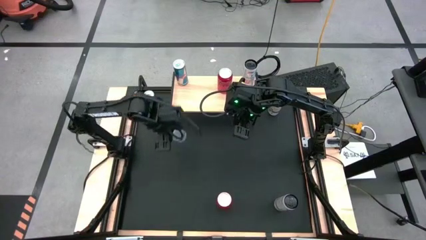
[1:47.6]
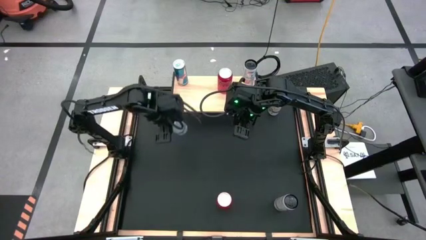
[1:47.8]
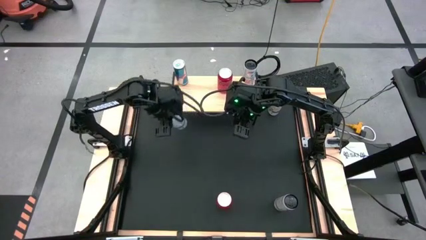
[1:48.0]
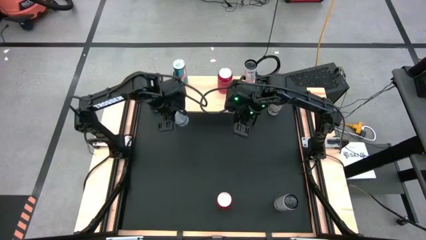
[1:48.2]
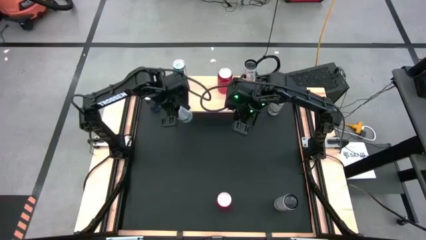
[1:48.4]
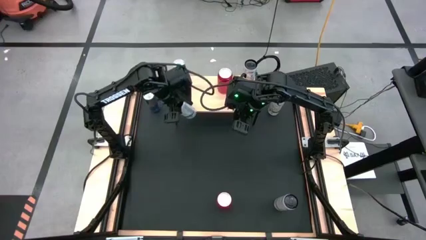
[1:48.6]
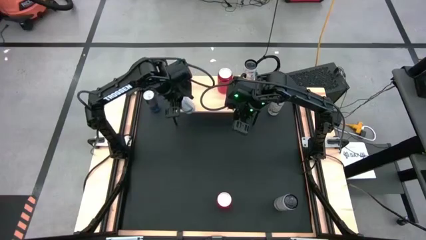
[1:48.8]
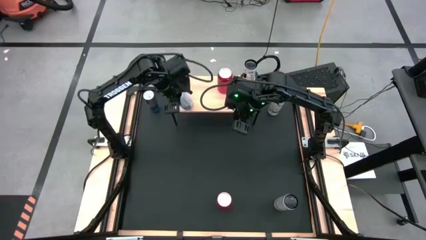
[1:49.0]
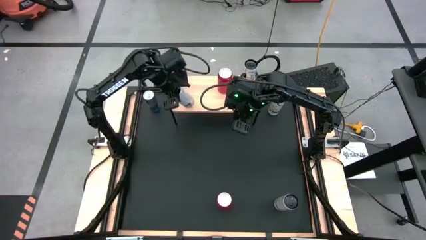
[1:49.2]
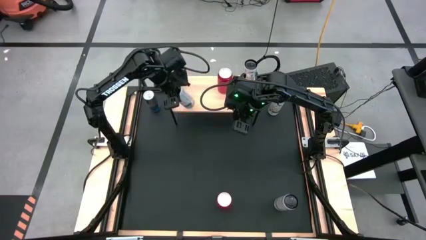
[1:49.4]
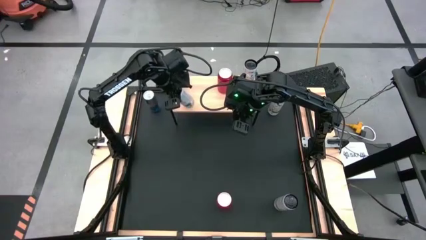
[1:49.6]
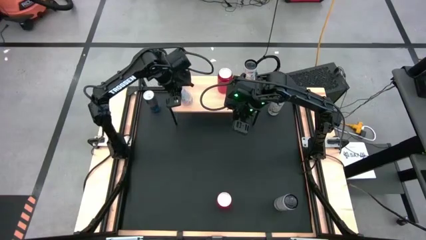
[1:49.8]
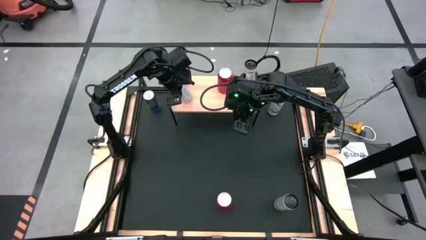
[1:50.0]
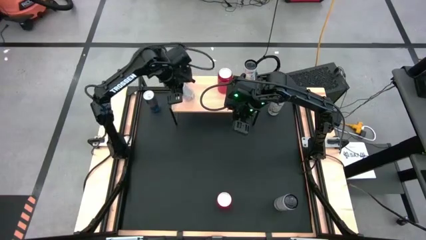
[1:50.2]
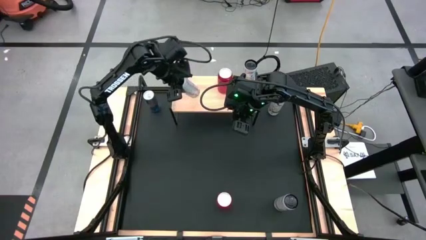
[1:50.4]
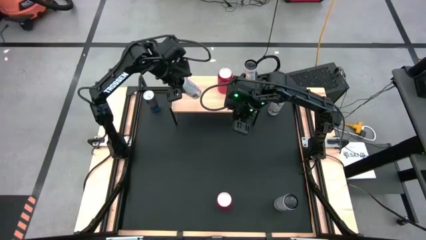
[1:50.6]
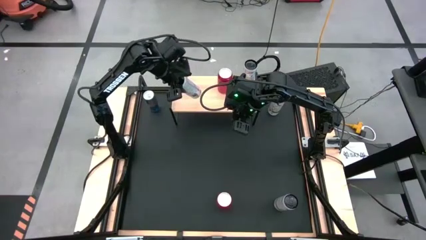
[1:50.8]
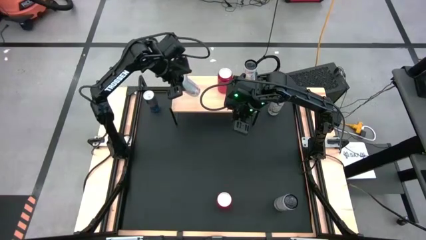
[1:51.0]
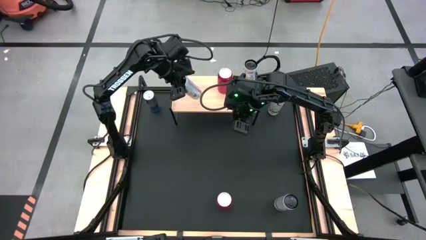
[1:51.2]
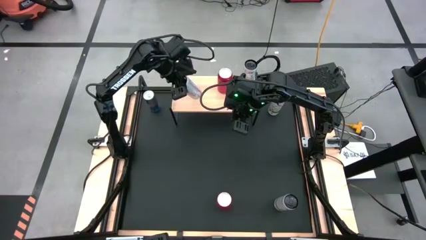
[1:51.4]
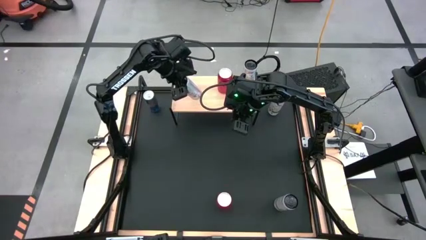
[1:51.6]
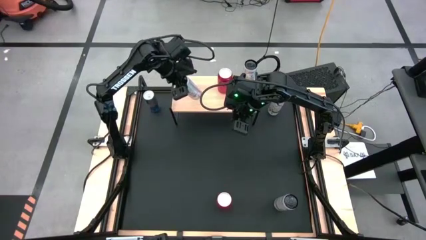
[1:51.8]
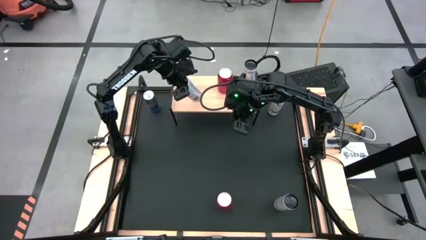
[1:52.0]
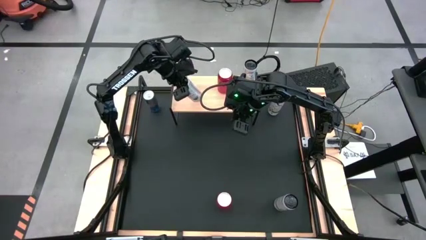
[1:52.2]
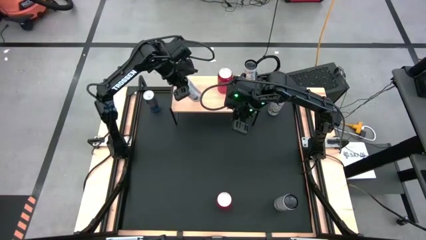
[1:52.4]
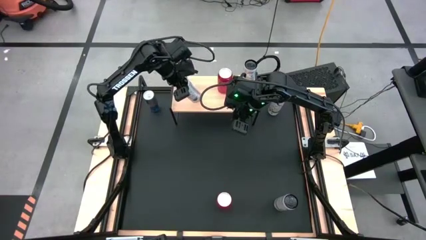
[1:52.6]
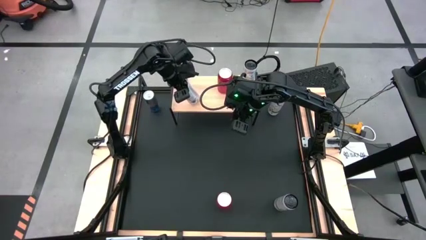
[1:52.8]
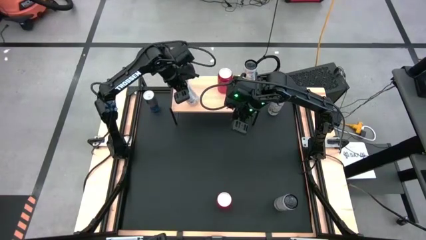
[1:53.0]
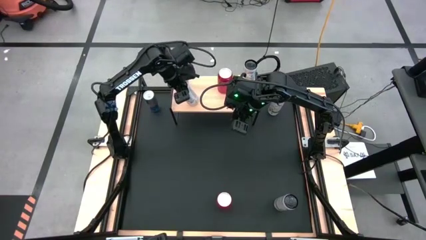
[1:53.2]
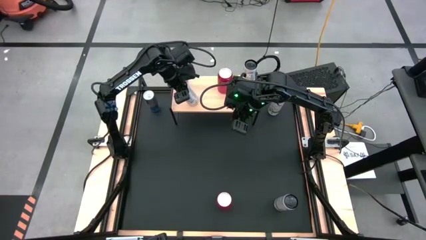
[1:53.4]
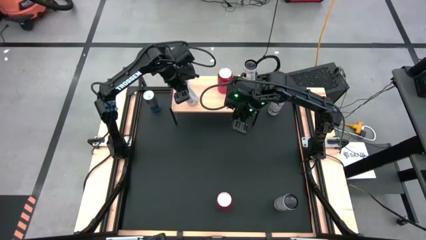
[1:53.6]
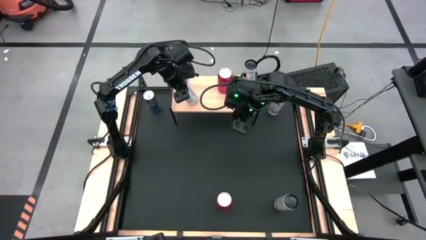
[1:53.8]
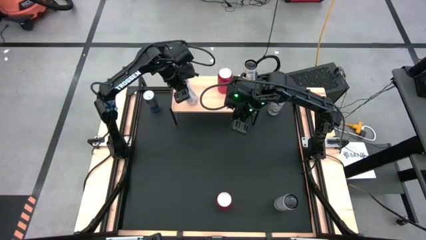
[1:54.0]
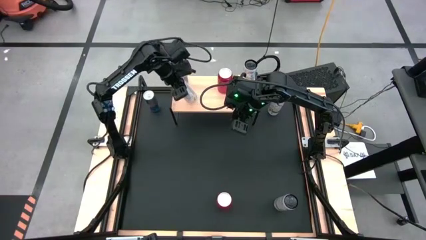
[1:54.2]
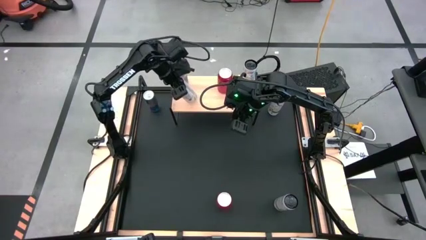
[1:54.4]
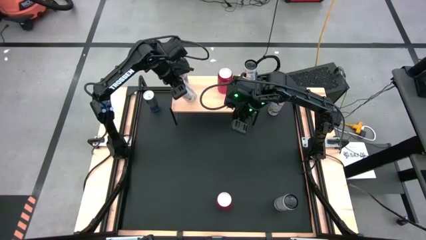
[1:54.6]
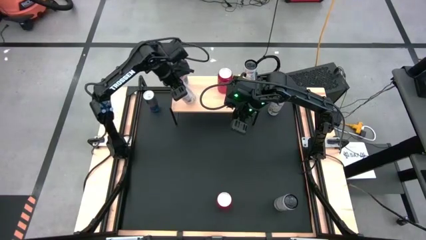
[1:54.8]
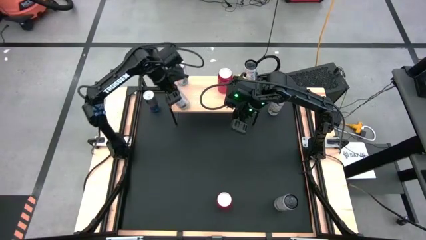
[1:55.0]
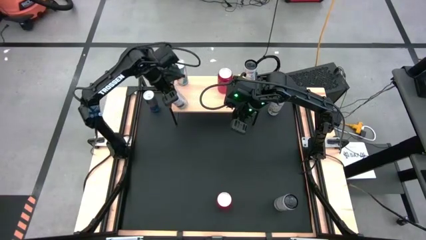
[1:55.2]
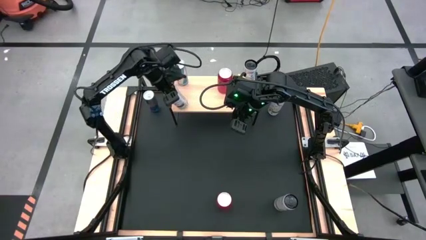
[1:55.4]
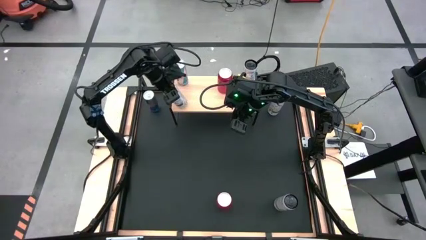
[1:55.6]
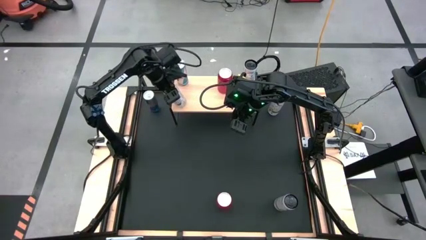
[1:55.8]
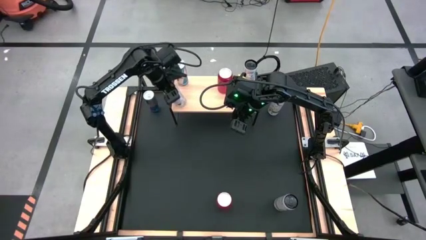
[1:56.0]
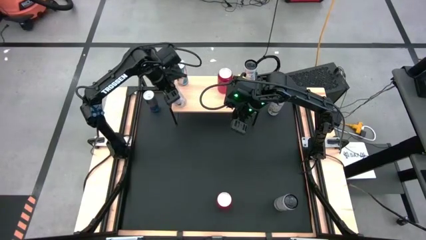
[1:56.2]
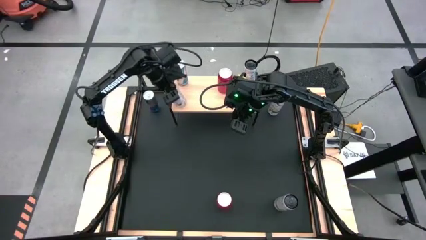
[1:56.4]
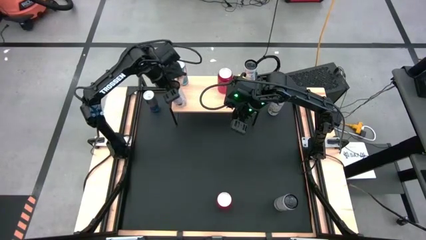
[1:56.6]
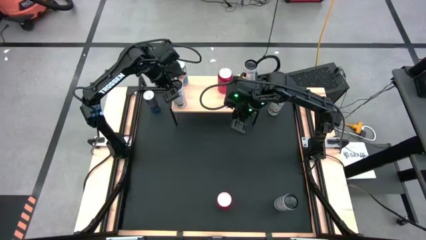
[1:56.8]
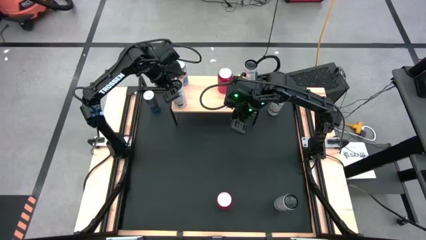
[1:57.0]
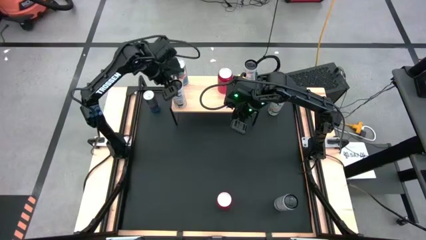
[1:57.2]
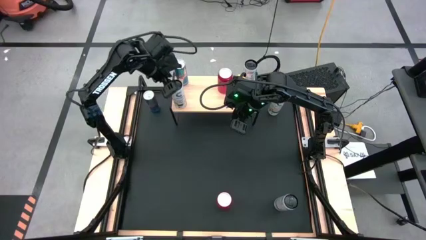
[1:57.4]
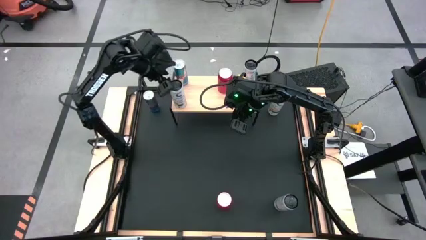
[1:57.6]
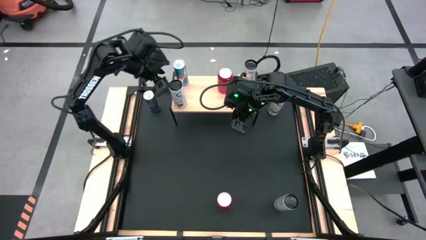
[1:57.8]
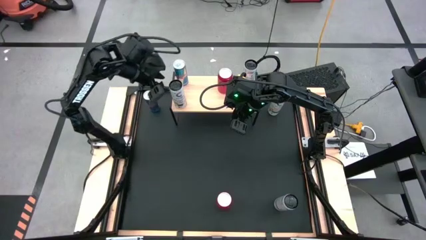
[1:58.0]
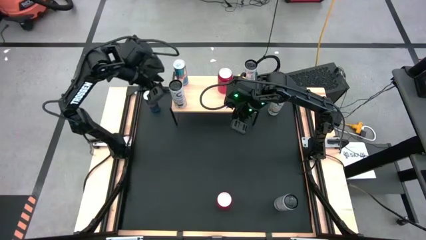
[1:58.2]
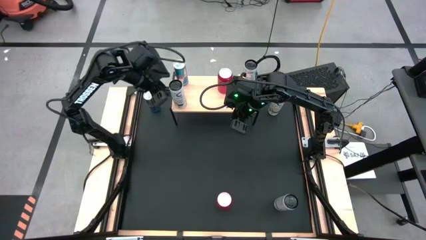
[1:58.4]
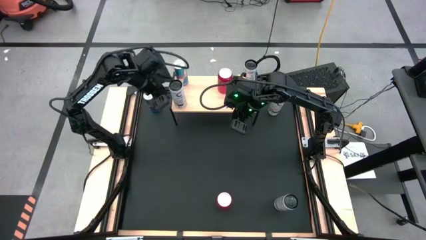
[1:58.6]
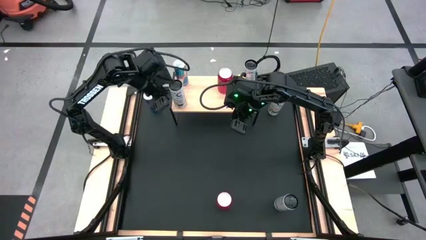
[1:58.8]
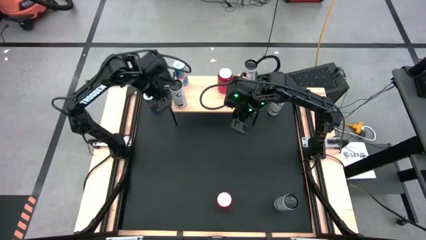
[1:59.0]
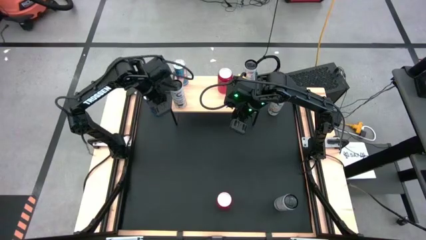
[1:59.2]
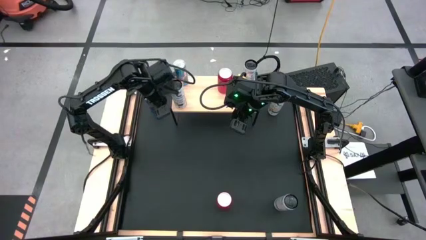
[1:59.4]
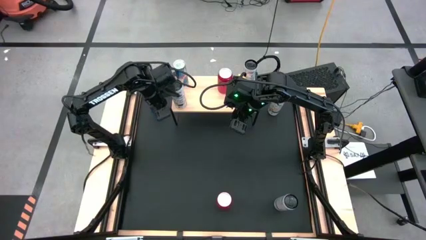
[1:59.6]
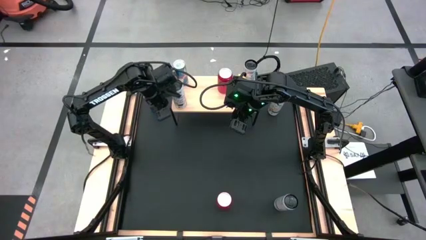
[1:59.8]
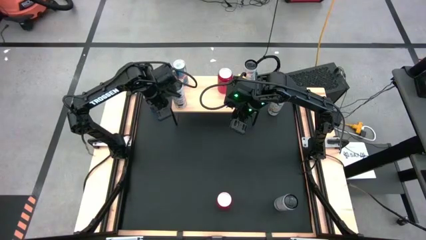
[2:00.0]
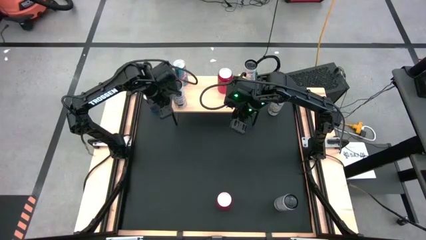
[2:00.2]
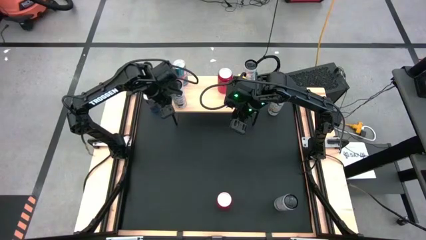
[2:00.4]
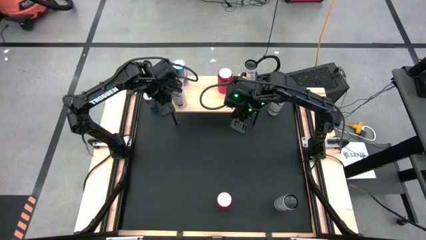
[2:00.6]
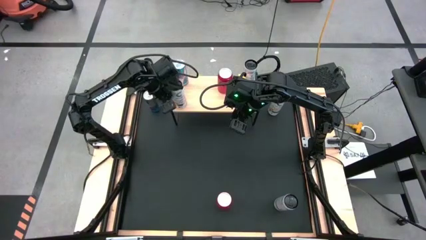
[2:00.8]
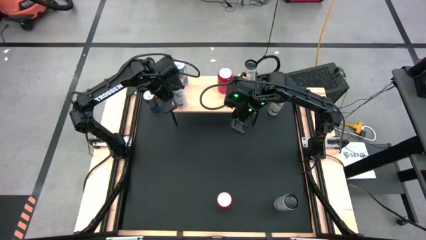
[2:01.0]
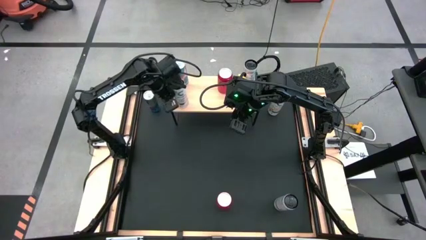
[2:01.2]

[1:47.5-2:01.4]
Task: Place canned beverage on shelf
Put the bottom white orange soda can on the shelf
